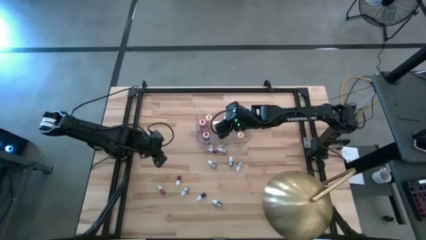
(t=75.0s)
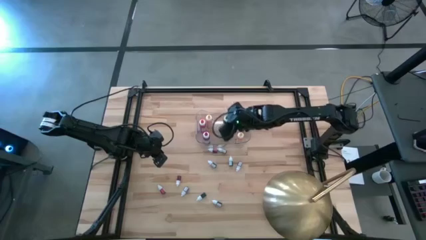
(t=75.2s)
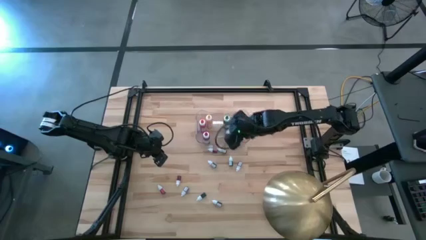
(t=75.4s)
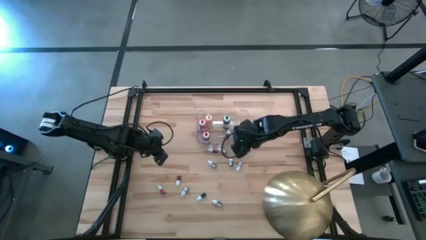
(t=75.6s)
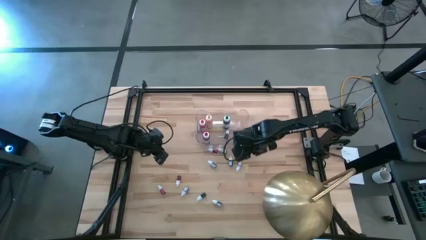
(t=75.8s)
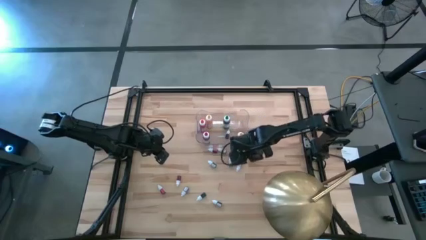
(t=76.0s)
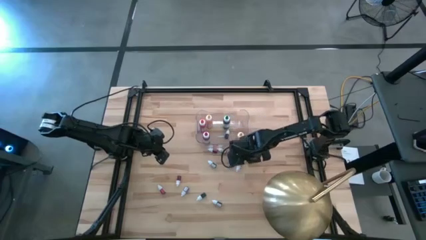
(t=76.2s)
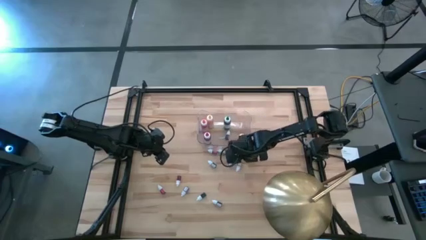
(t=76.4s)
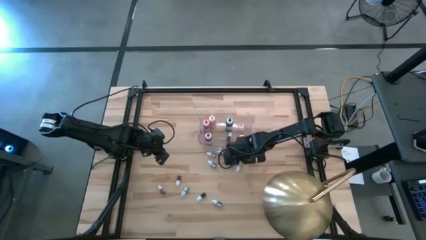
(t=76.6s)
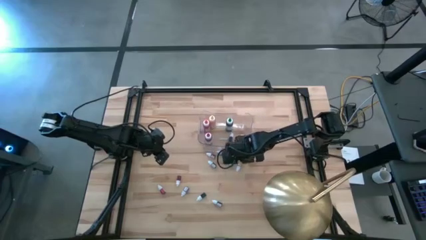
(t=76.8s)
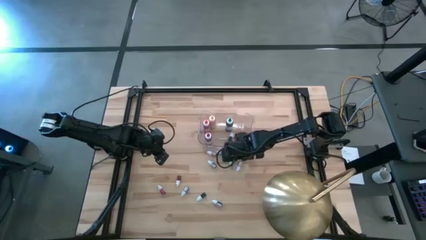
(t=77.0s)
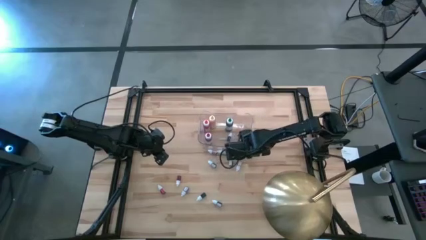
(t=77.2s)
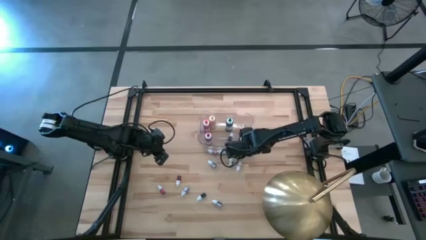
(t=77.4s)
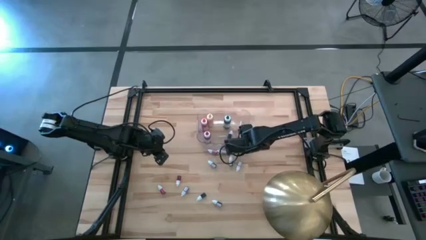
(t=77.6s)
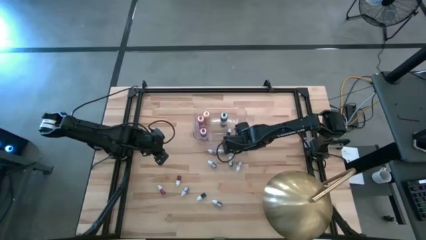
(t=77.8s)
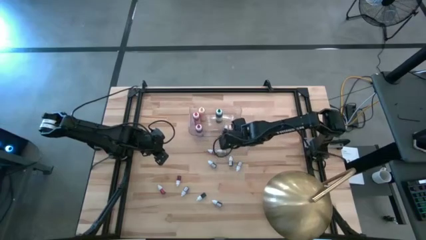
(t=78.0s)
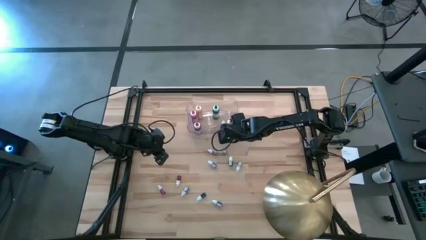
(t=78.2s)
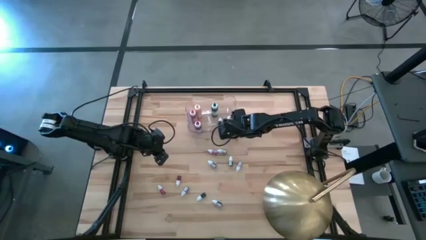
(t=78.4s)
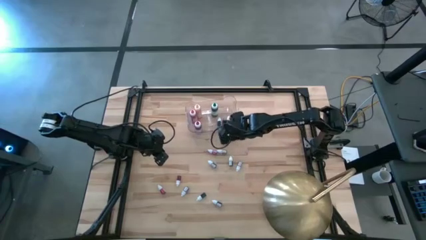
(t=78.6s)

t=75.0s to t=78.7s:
Task: Pick & Place food coloring
Adjust the transparent bin

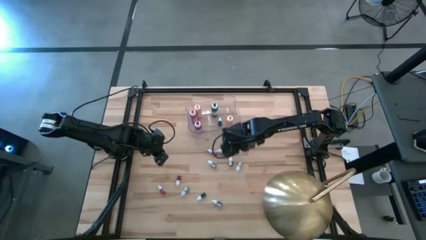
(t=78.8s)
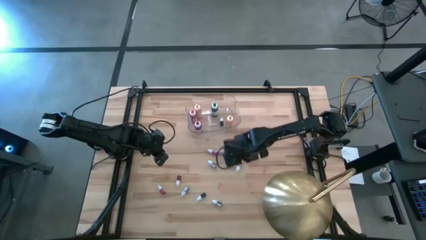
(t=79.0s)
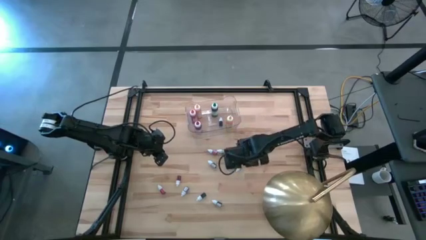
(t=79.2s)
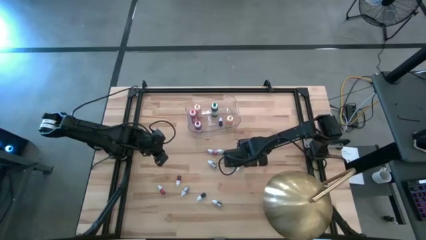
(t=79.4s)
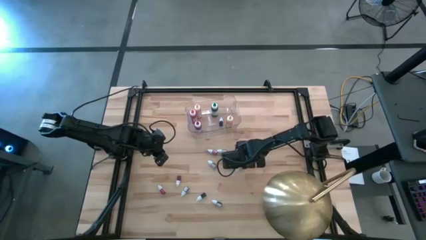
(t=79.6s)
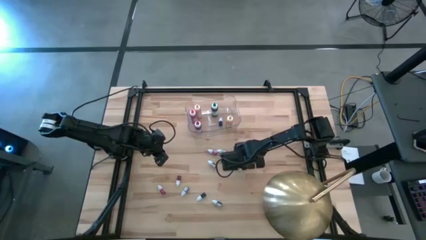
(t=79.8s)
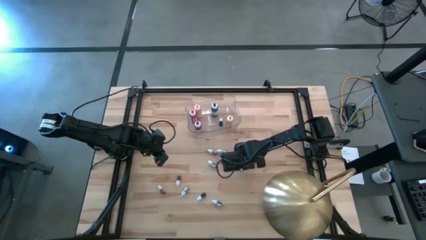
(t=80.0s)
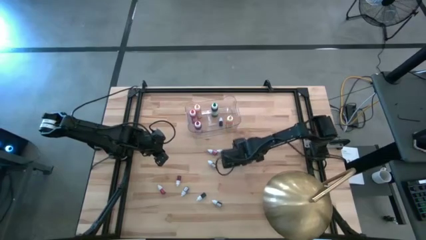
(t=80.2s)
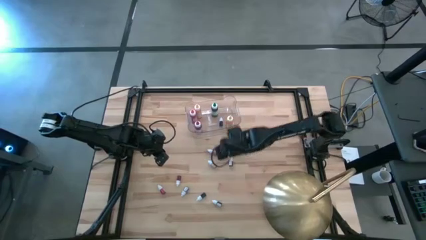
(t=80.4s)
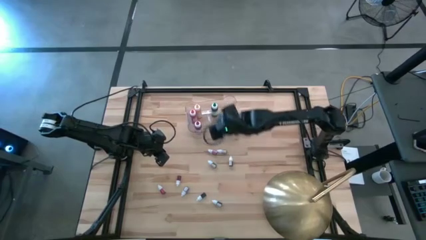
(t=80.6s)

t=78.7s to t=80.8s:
Put the small purple food coloring bottle in the transparent bin

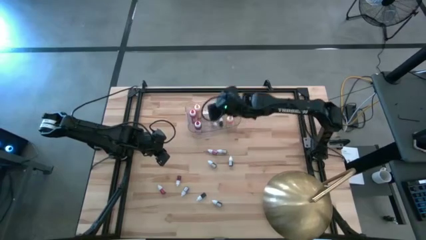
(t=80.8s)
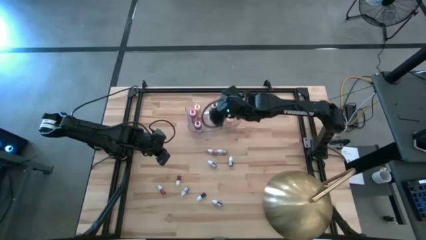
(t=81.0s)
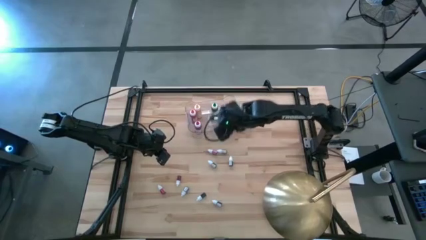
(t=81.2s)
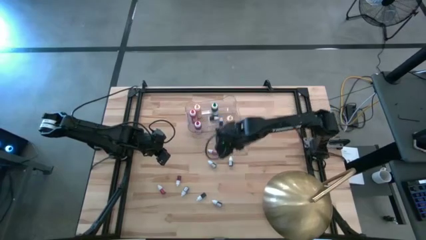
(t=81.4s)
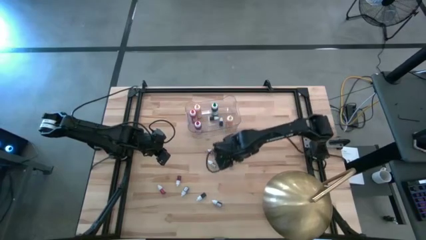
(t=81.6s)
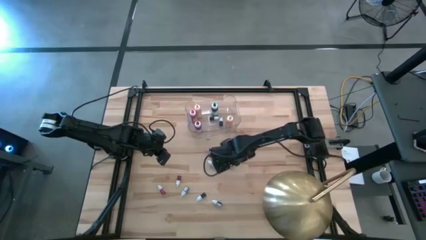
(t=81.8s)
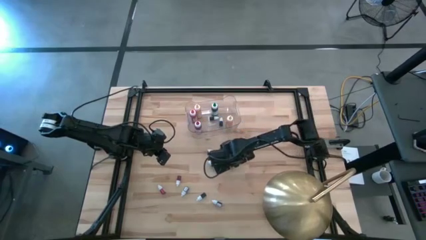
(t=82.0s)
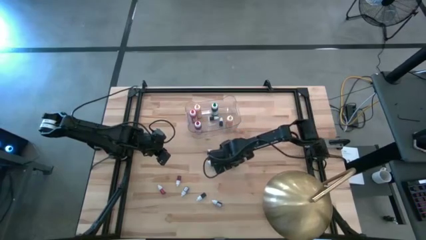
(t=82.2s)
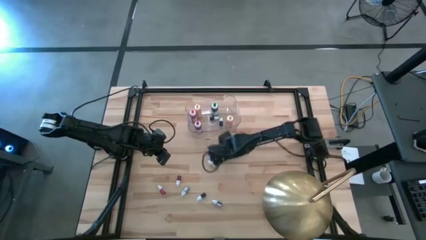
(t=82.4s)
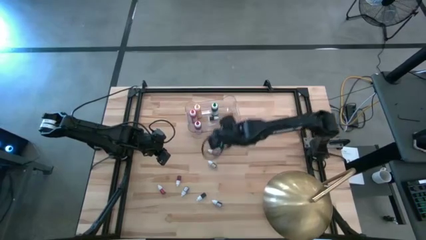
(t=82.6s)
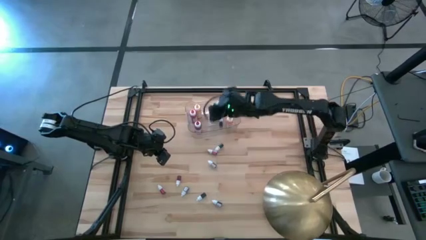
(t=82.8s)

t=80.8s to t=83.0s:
Put the bottom right small green food coloring bottle in the transparent bin

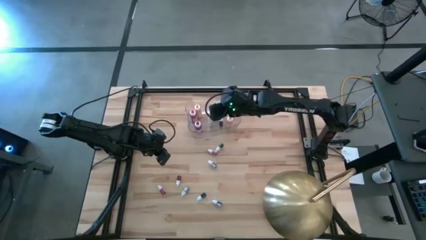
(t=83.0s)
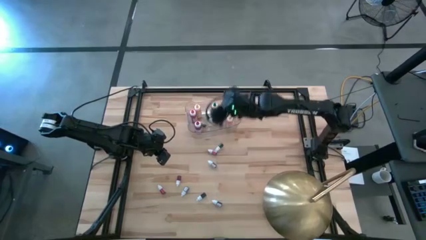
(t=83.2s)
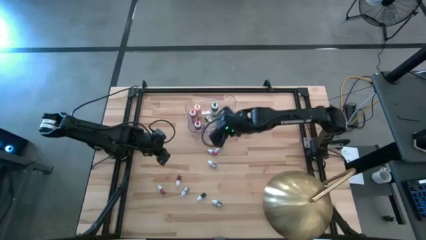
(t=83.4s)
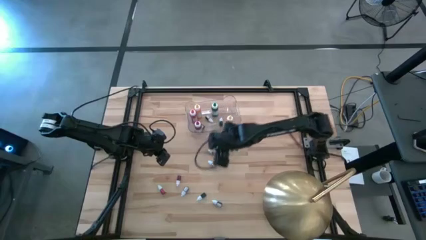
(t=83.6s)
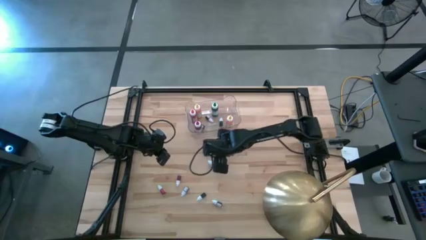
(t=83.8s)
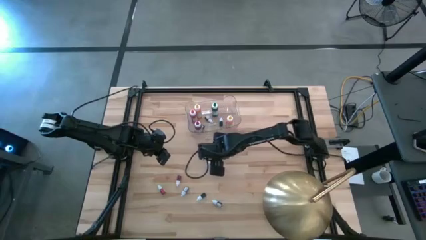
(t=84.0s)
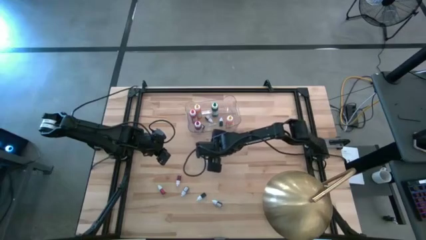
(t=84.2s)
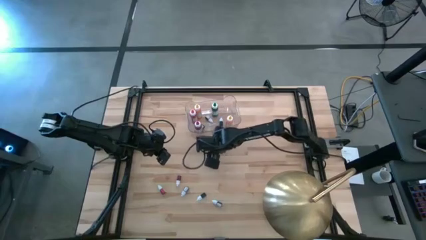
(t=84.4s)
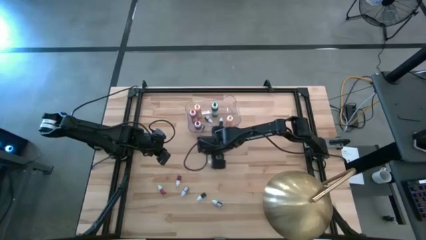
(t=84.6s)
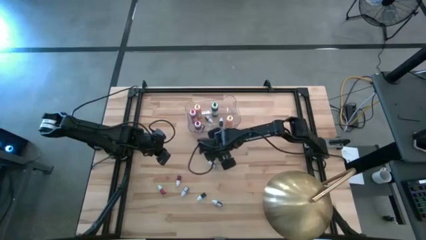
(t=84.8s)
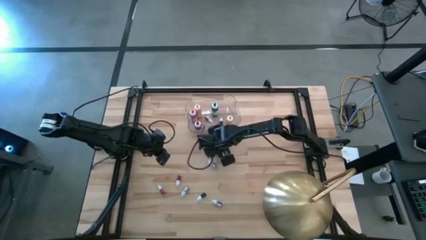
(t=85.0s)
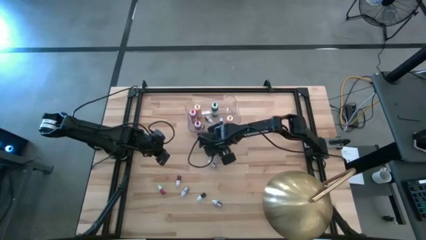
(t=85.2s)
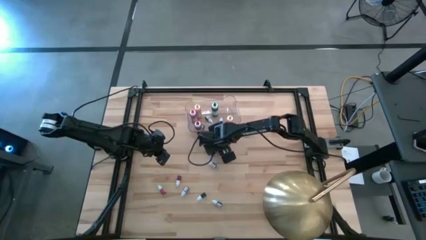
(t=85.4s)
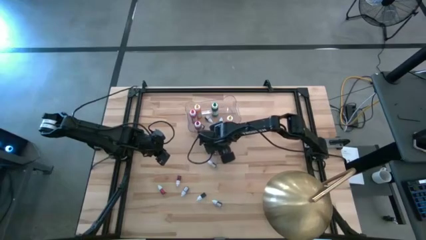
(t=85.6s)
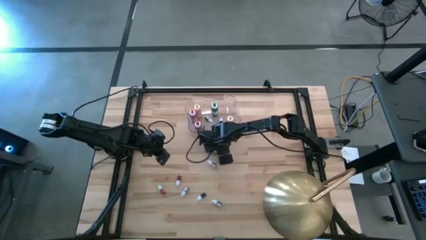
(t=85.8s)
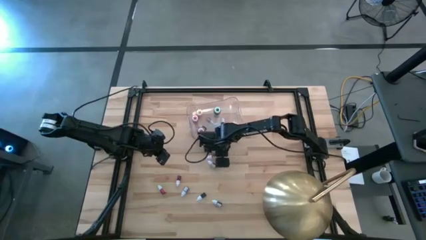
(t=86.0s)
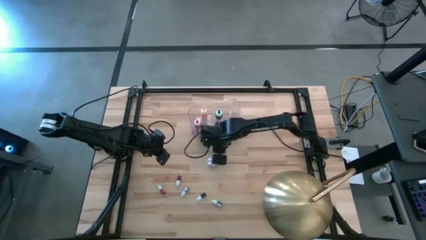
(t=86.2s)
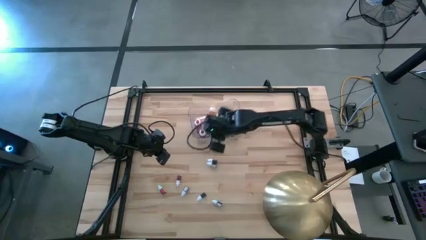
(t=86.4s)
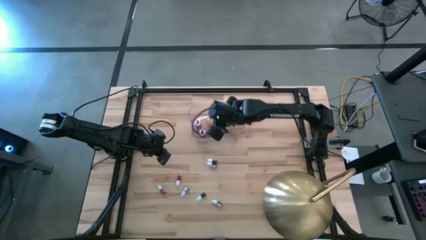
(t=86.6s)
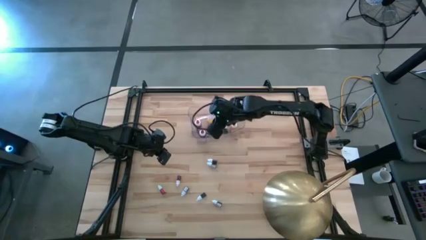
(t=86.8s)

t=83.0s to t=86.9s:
Put the top small green food coloring bottle in the bin

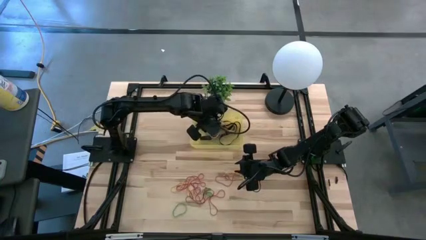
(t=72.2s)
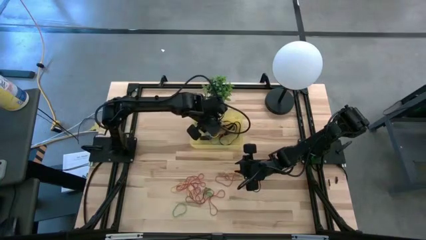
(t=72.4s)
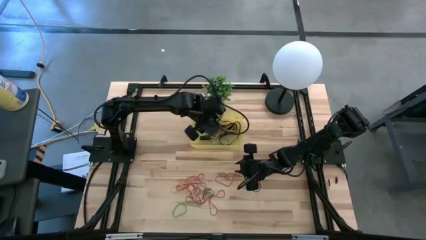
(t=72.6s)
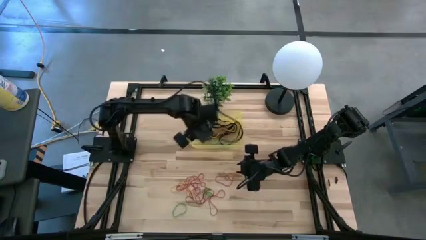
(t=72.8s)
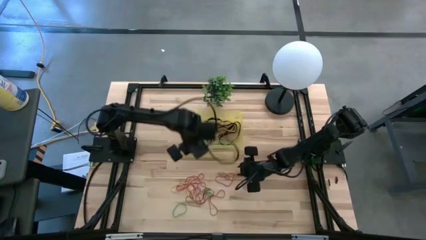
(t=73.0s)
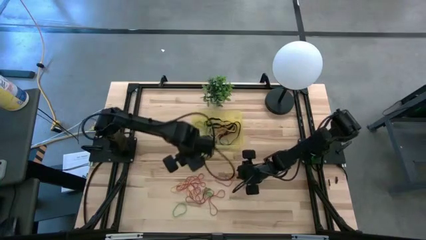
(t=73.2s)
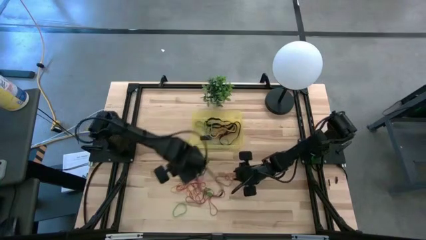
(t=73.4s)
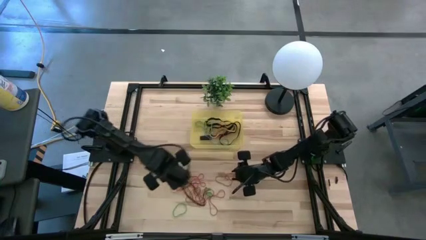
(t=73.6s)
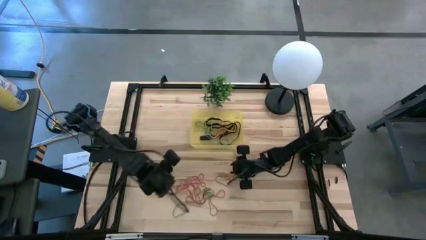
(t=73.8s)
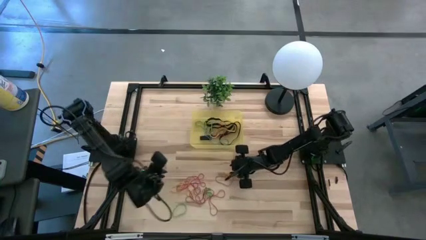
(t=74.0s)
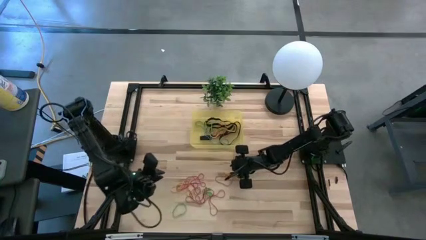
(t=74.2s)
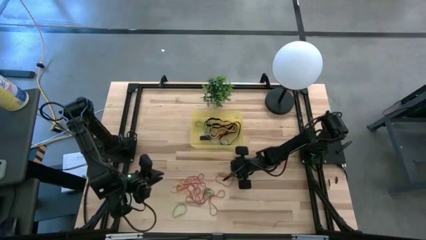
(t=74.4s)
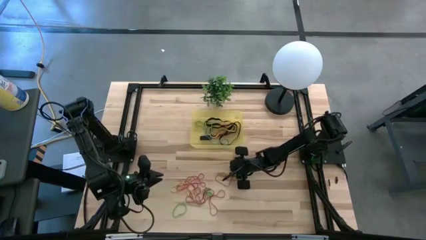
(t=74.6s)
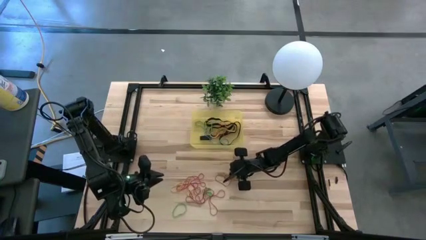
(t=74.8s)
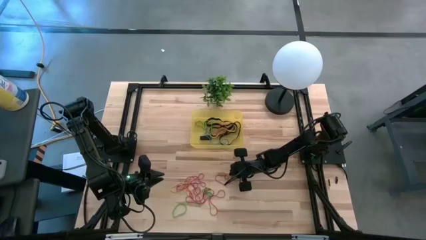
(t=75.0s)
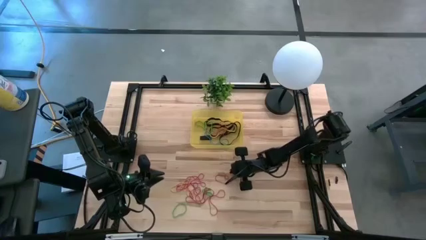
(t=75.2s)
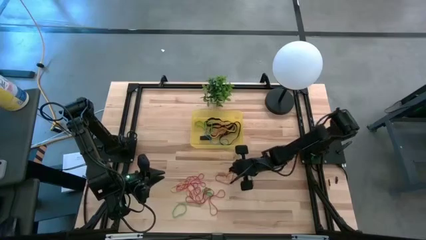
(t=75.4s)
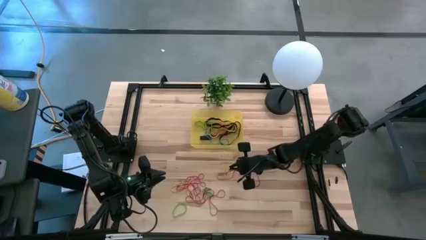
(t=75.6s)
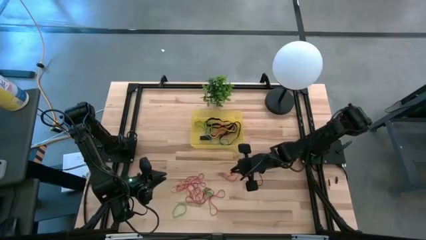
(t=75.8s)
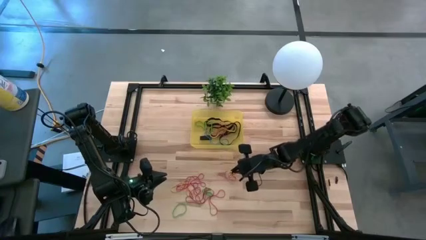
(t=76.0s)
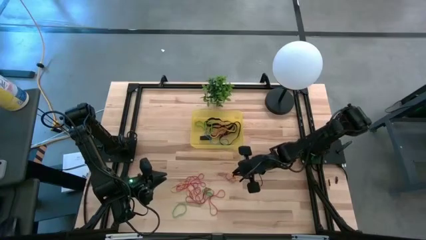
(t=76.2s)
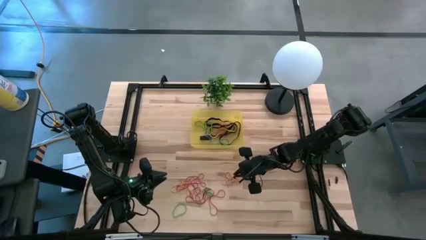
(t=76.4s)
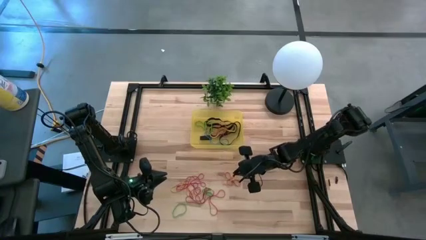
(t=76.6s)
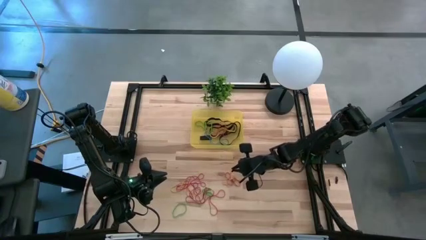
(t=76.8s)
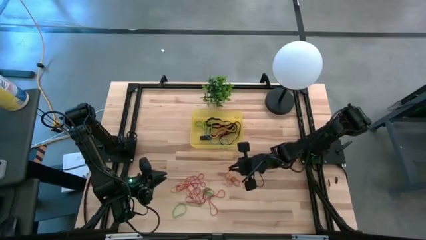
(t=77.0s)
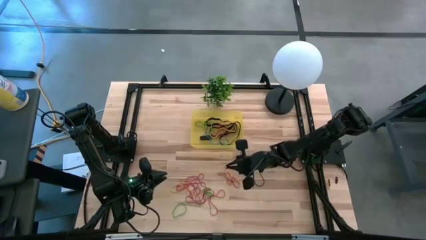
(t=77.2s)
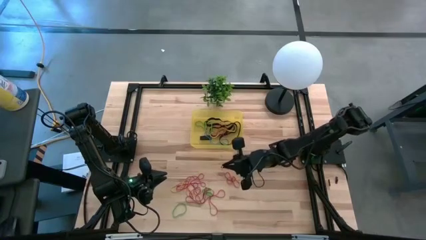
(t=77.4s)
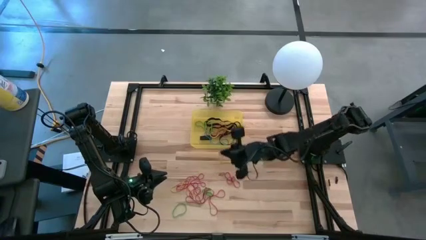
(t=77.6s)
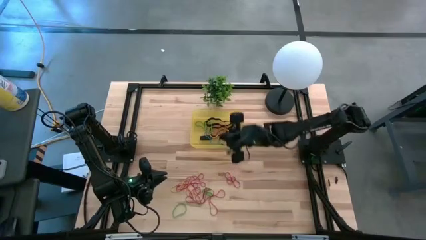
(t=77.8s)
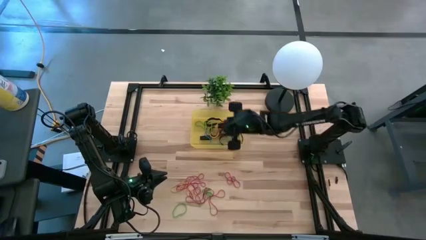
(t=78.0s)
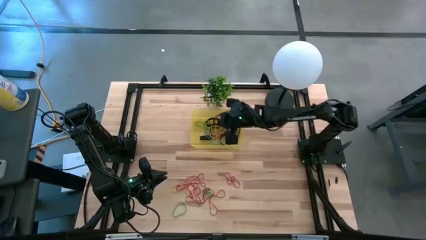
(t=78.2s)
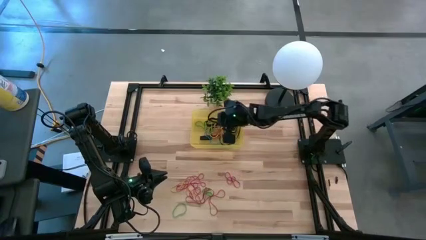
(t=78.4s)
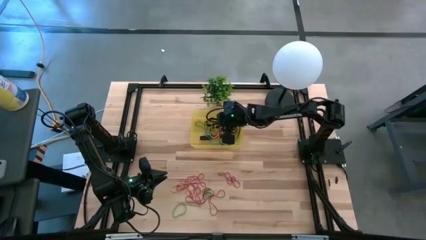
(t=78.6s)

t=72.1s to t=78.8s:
Task: Pick and place rubber bands into bin
Put the yellow rubber band into the yellow bin
